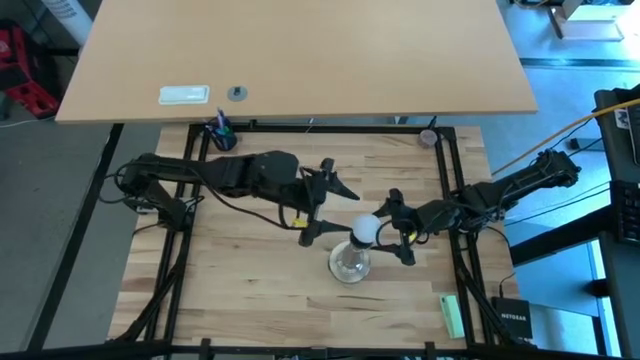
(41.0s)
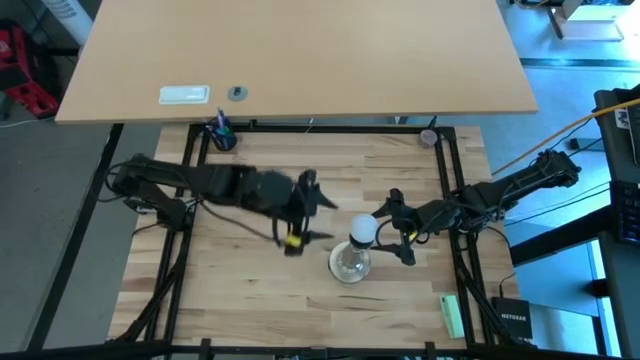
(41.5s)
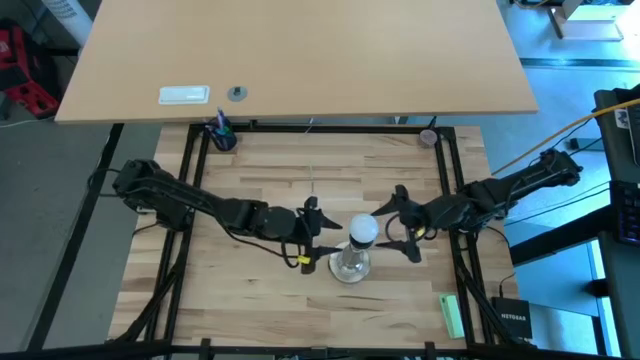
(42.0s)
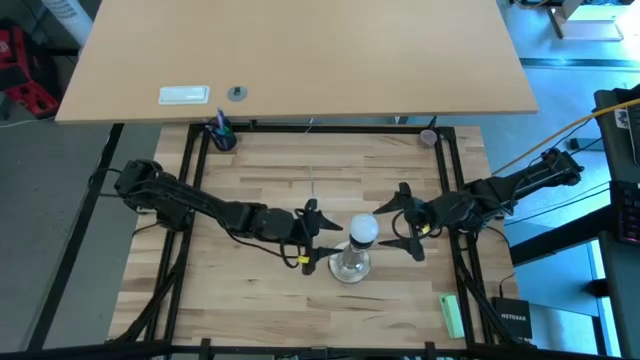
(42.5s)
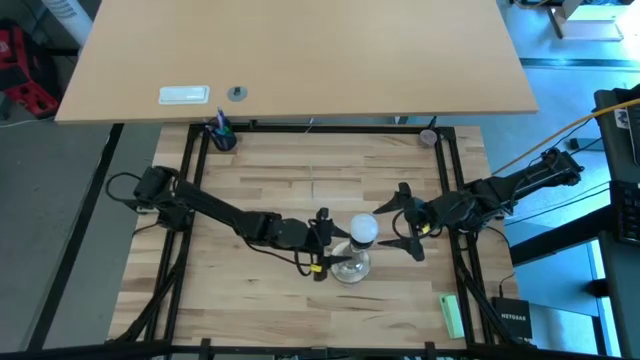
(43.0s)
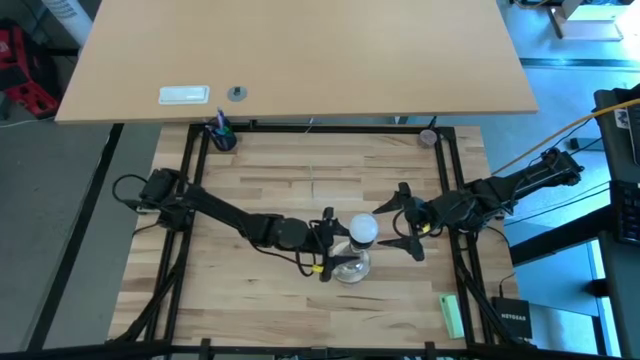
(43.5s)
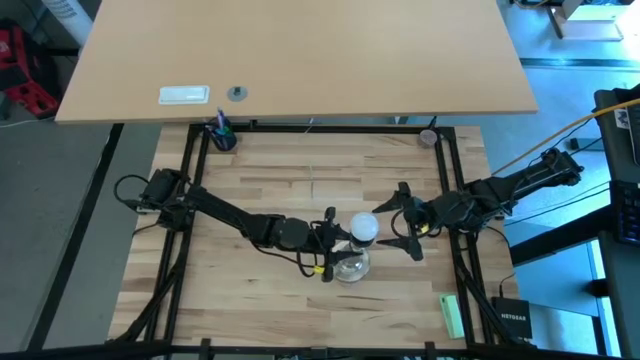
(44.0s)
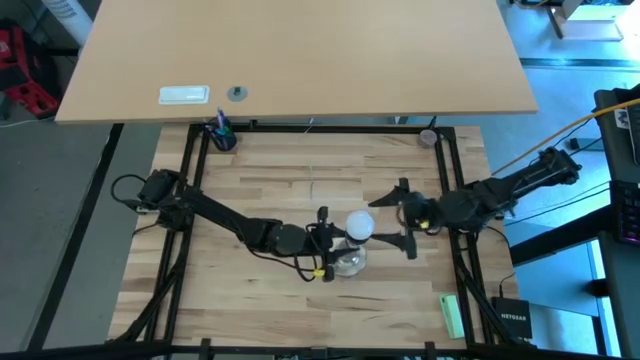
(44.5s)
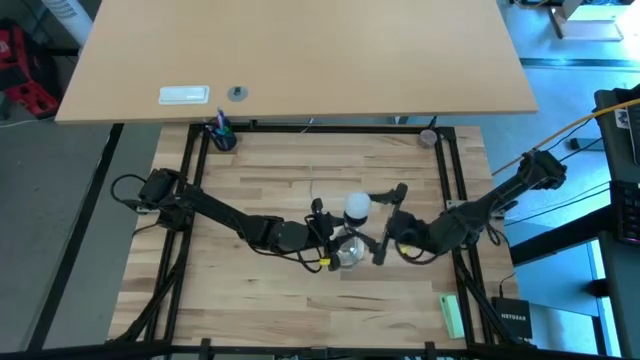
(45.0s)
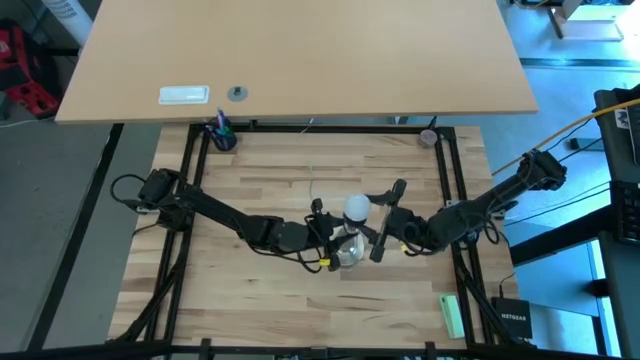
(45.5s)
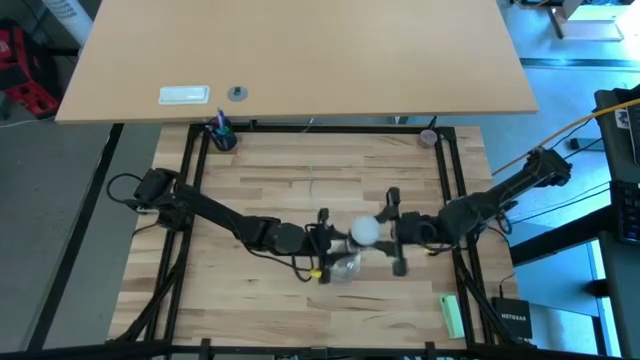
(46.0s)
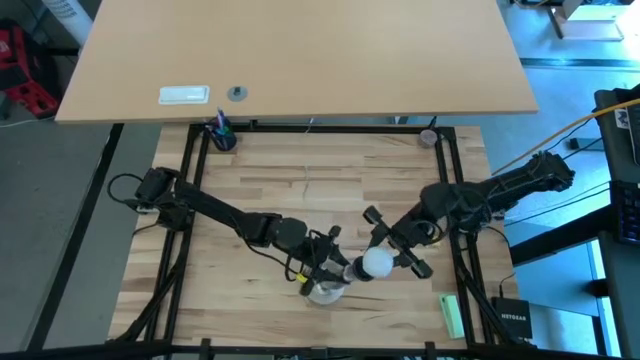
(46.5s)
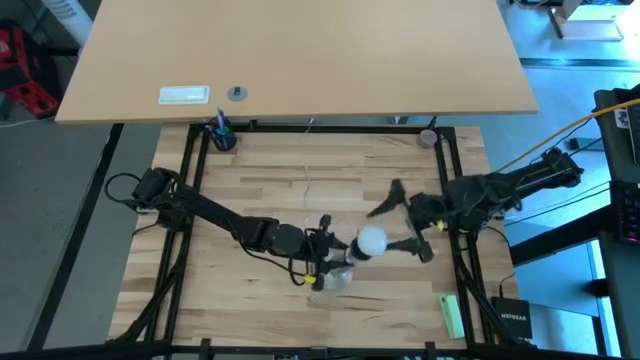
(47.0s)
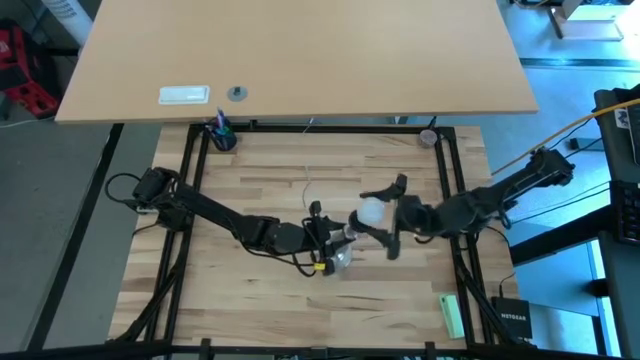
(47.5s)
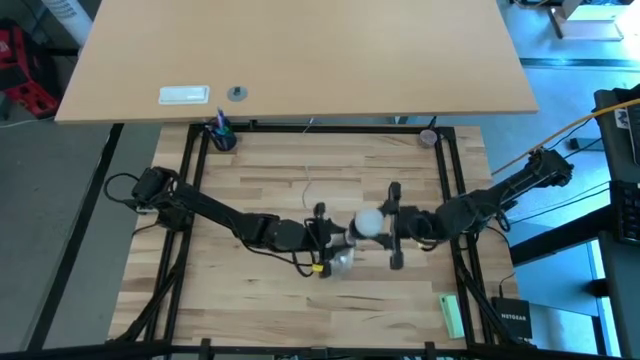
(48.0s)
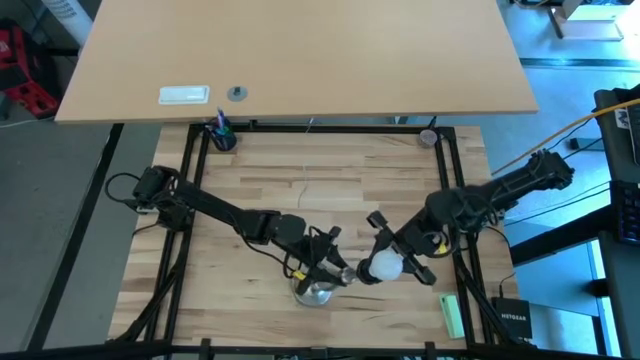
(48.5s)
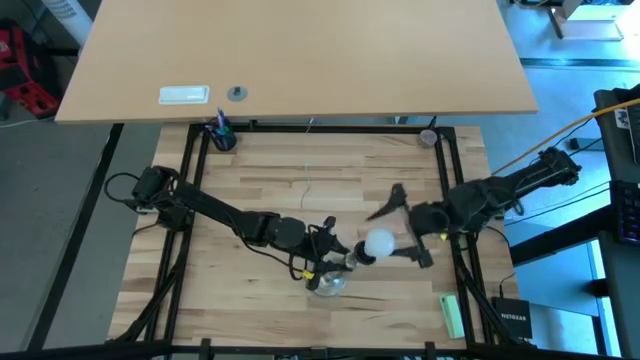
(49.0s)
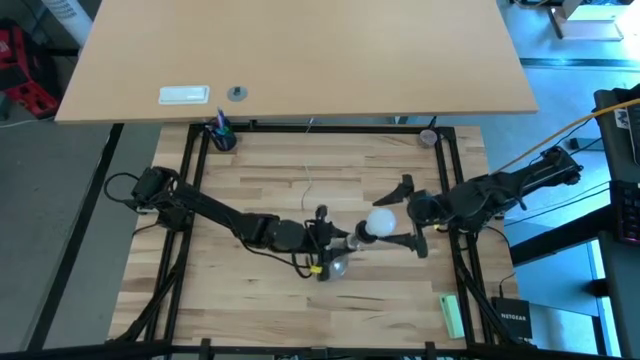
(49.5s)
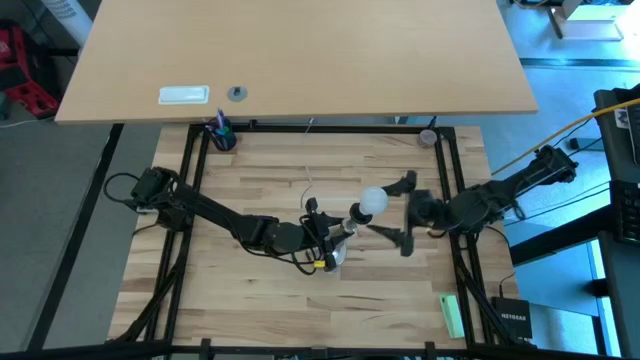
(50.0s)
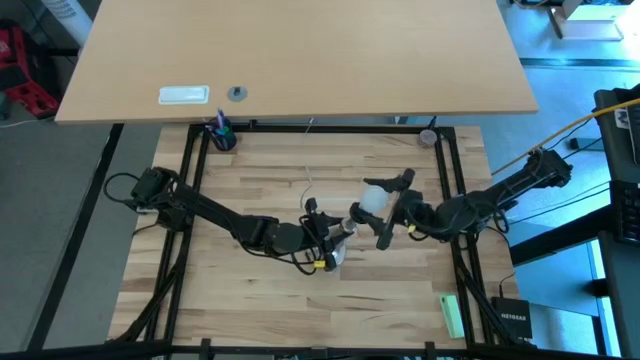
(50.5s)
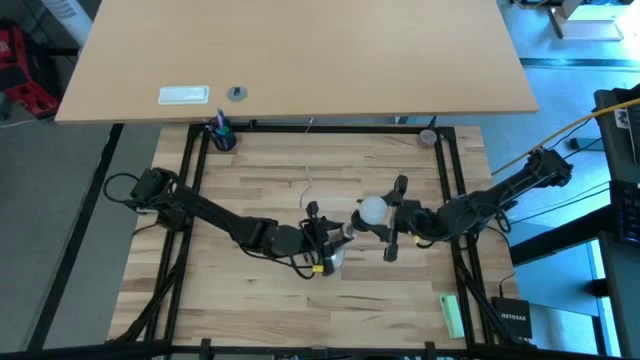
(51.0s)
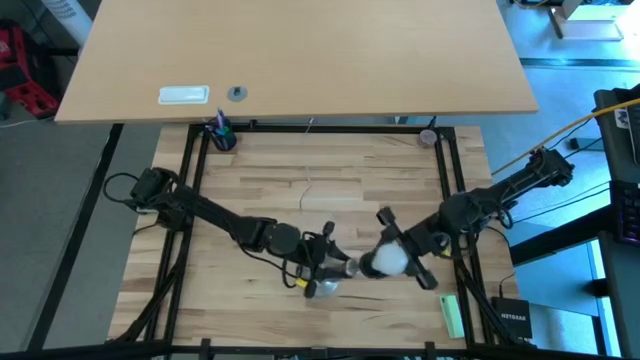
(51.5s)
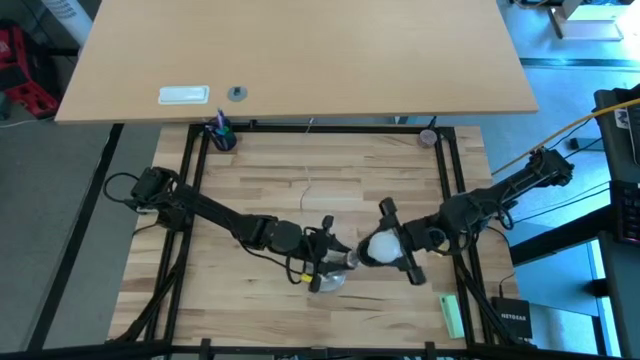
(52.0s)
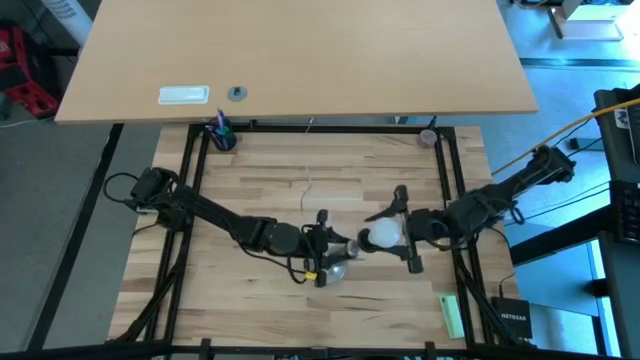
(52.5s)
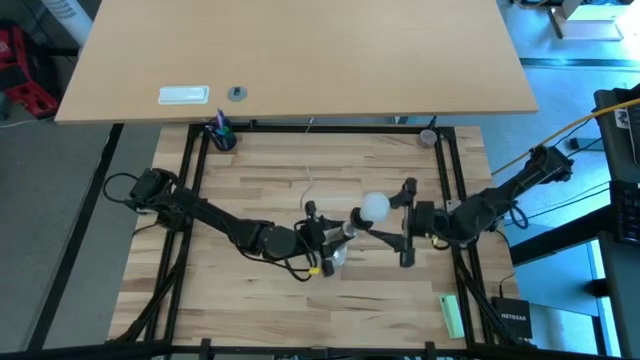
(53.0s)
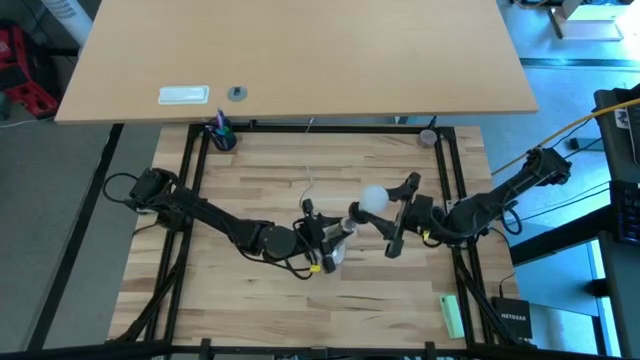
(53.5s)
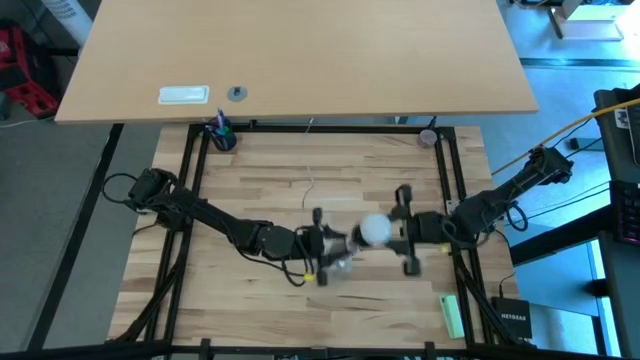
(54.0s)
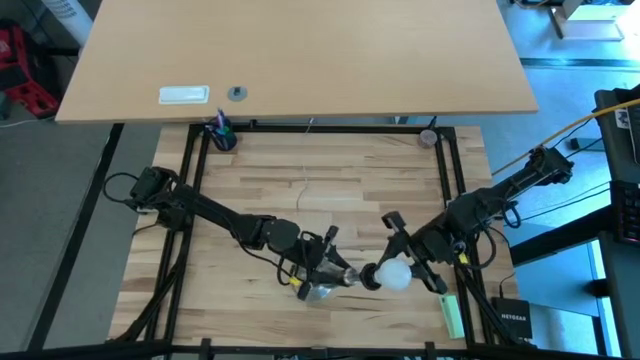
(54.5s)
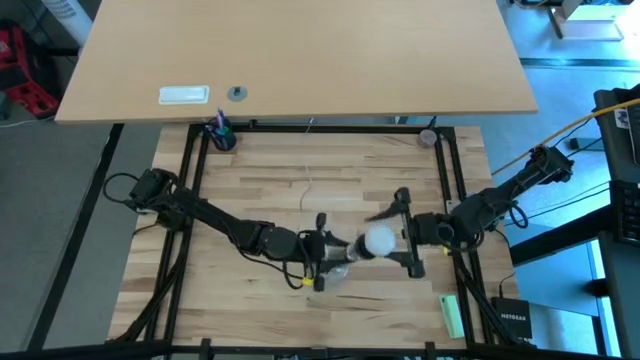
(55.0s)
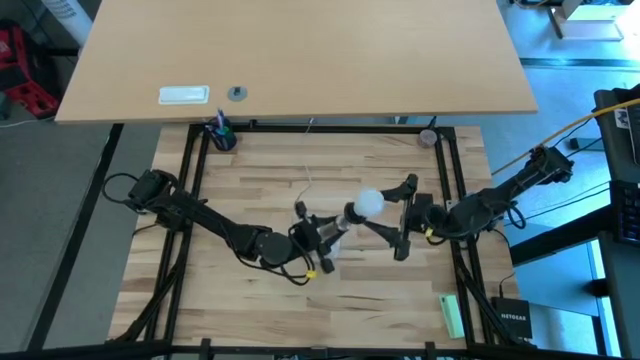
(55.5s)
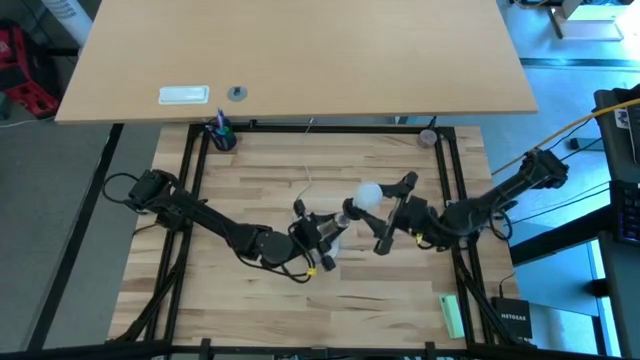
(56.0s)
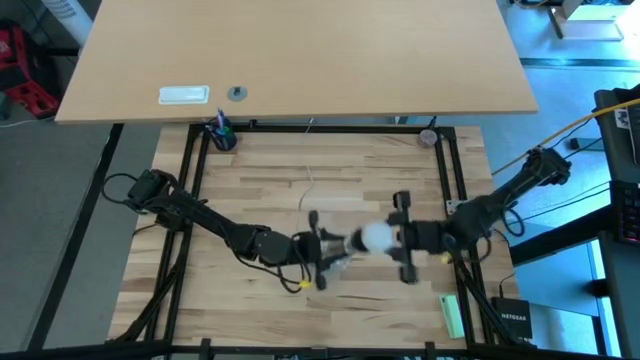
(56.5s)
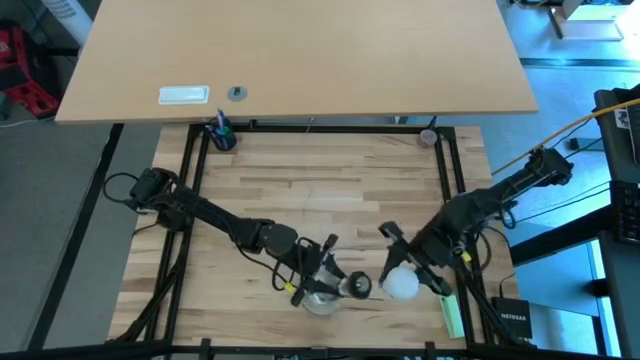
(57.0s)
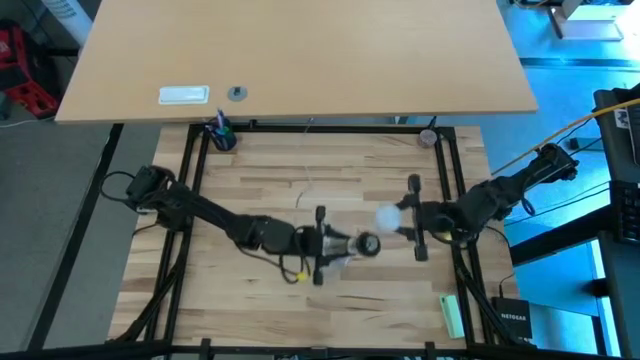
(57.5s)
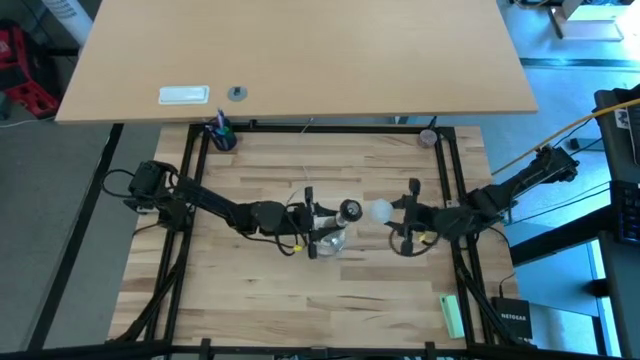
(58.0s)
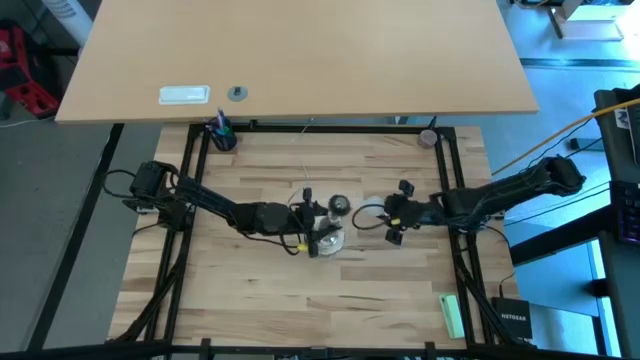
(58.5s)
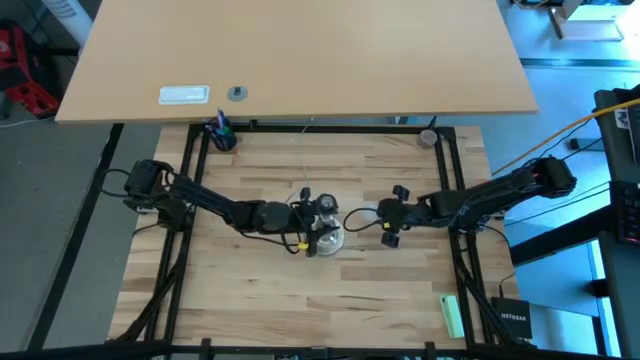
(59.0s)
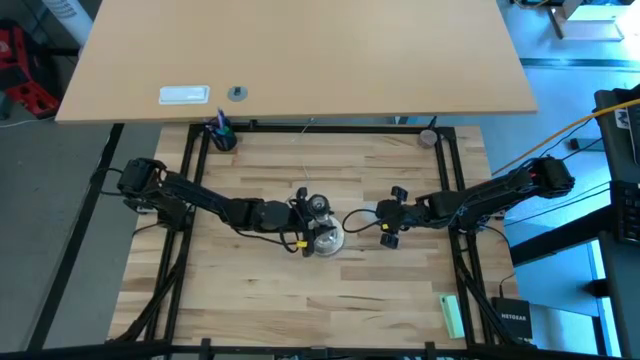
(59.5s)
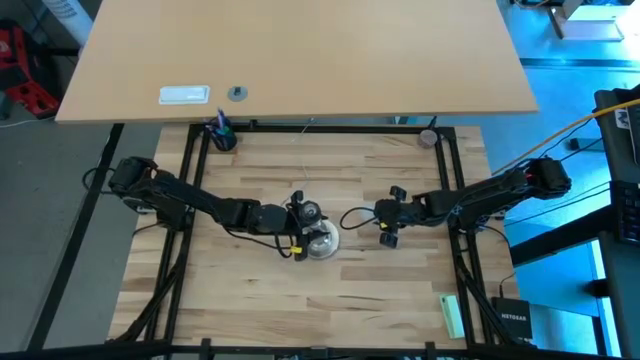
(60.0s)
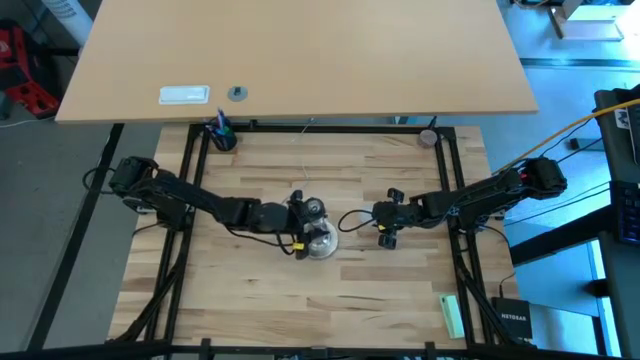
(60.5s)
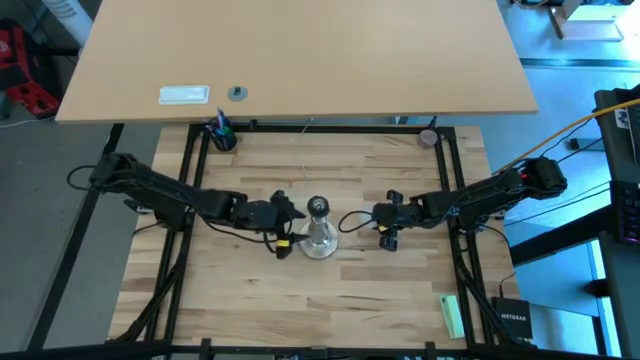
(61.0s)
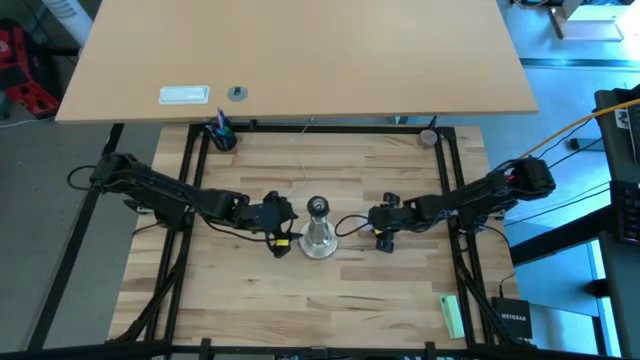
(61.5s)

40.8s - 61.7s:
Task: Screw lightbulb
Remove the light bulb from the lamp

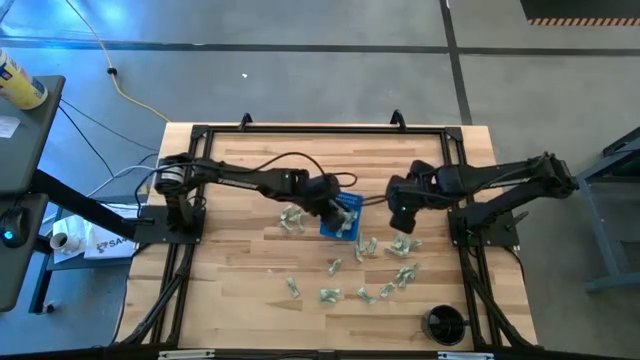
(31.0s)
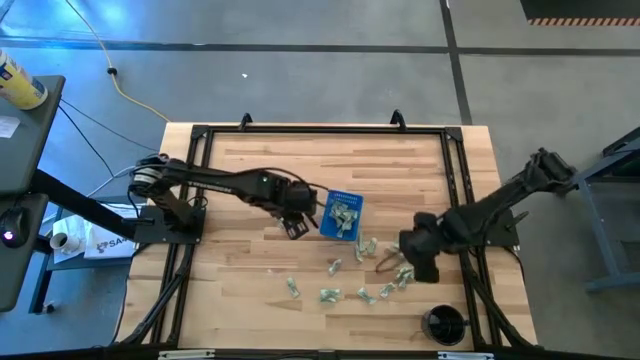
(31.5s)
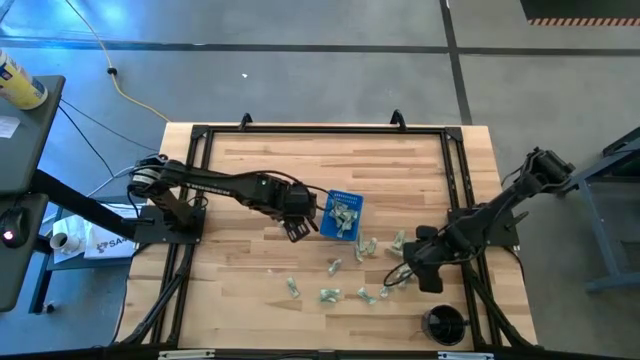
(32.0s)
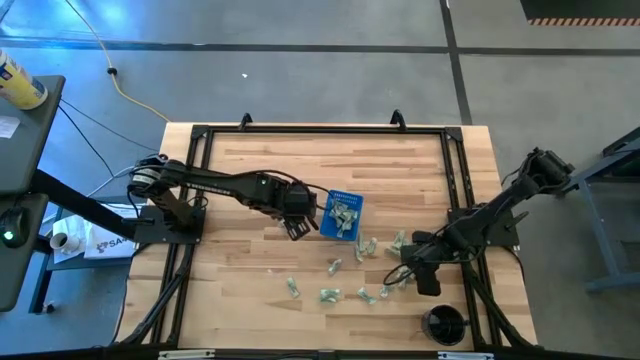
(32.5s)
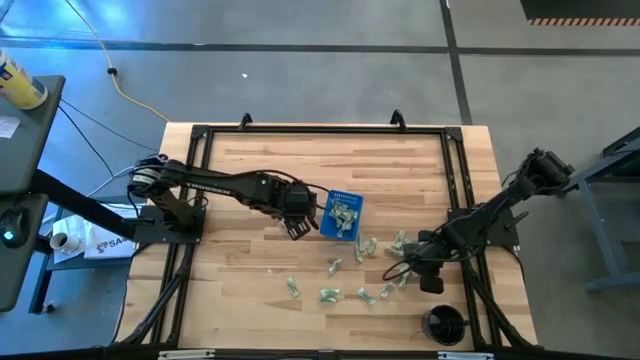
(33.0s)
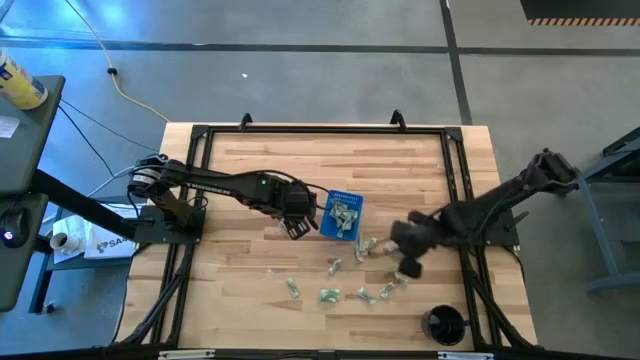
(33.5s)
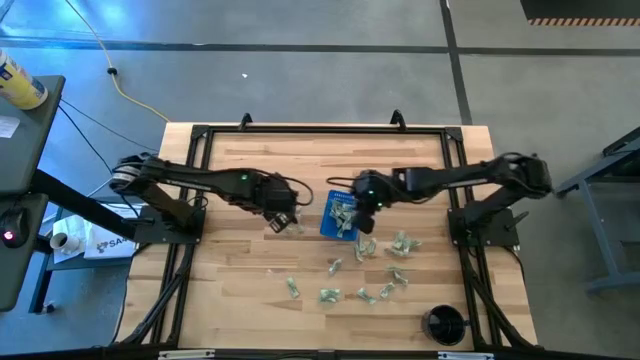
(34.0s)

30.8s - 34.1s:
Task: Pick and place Stevia / Truvia into bins
Put the stevia packet into the blue basket
